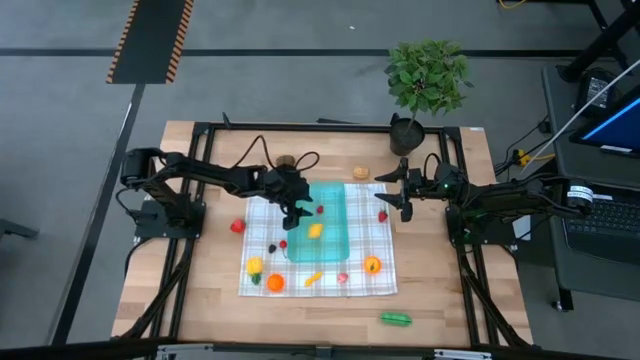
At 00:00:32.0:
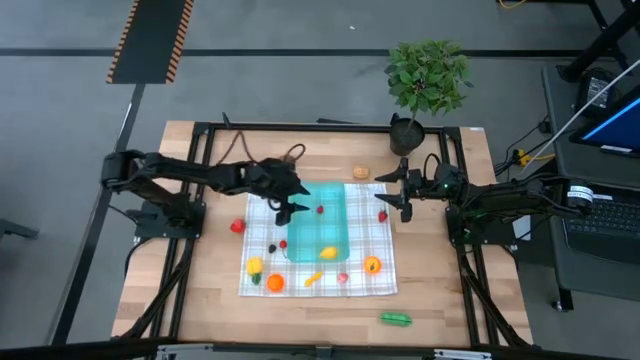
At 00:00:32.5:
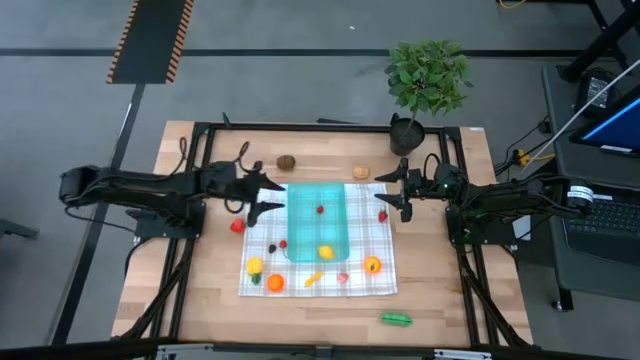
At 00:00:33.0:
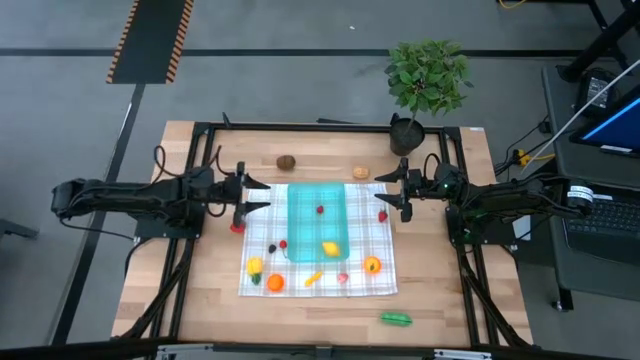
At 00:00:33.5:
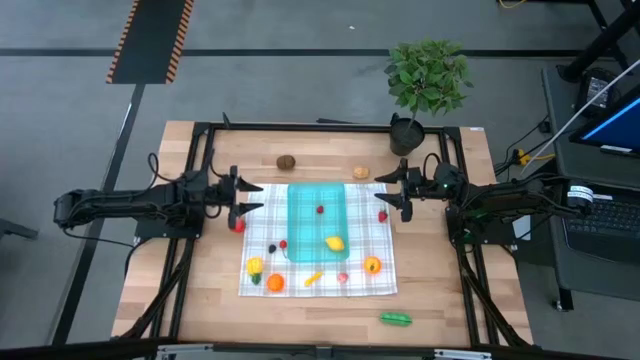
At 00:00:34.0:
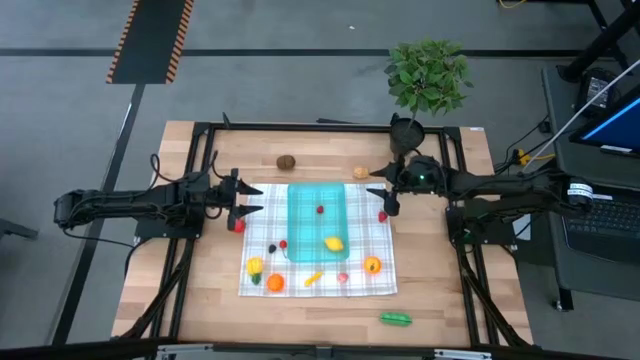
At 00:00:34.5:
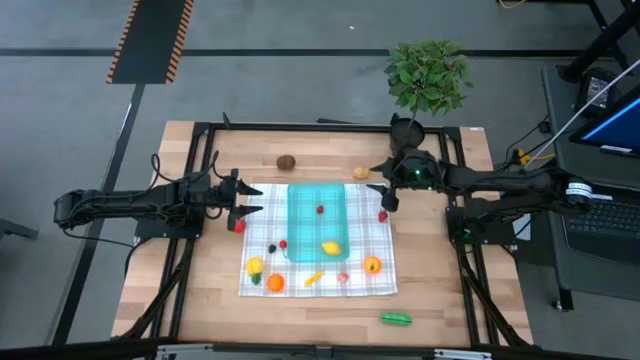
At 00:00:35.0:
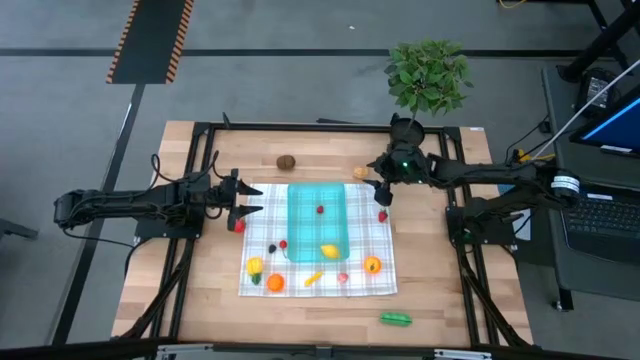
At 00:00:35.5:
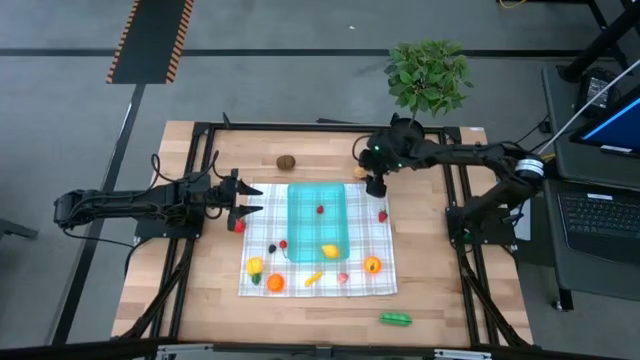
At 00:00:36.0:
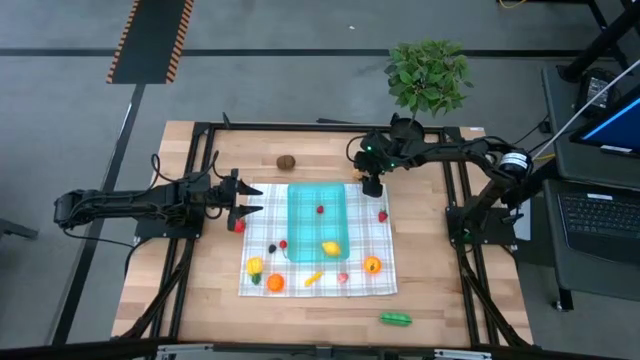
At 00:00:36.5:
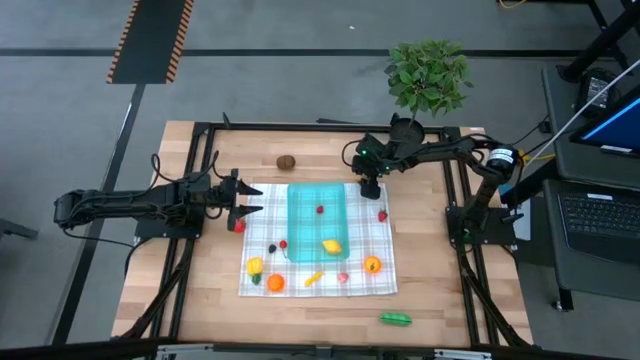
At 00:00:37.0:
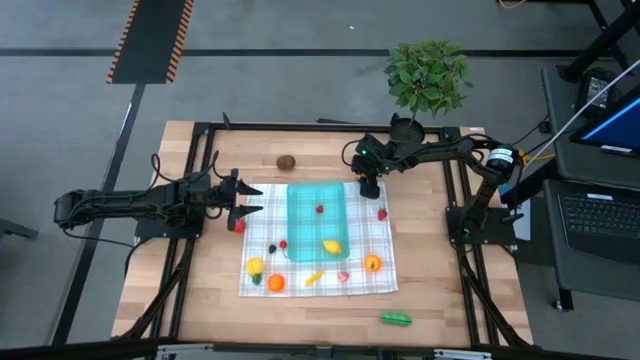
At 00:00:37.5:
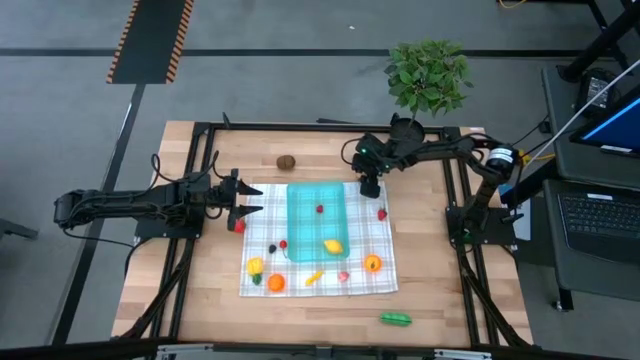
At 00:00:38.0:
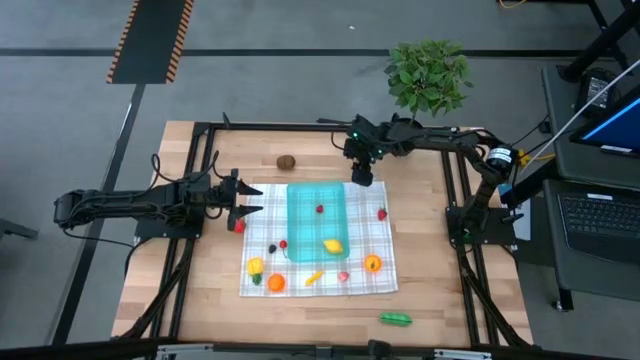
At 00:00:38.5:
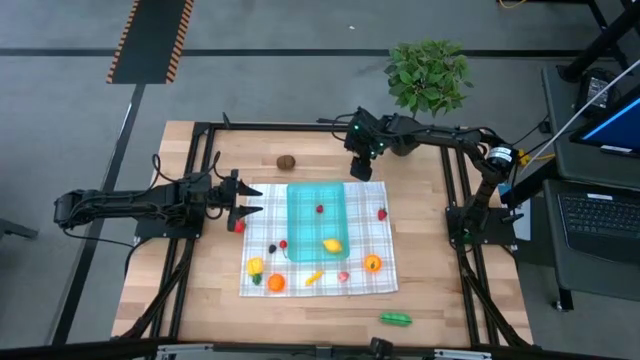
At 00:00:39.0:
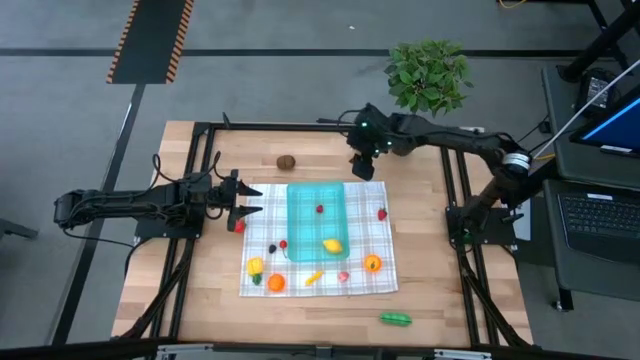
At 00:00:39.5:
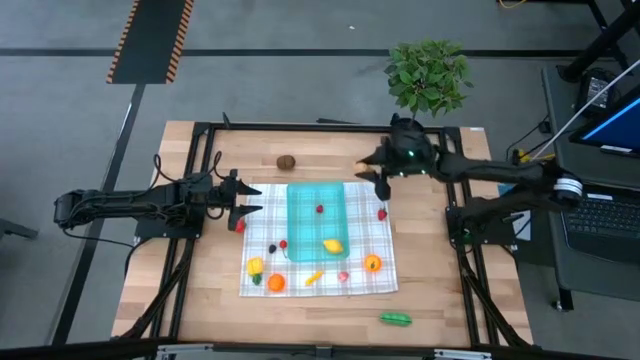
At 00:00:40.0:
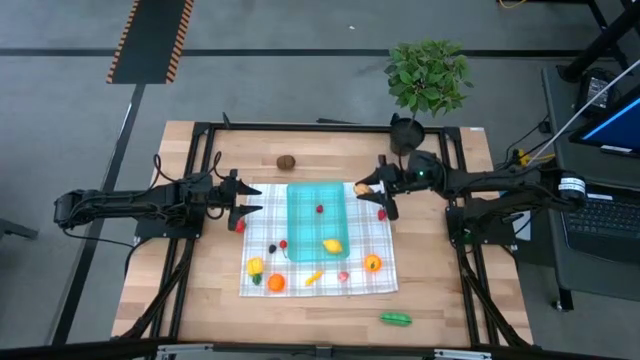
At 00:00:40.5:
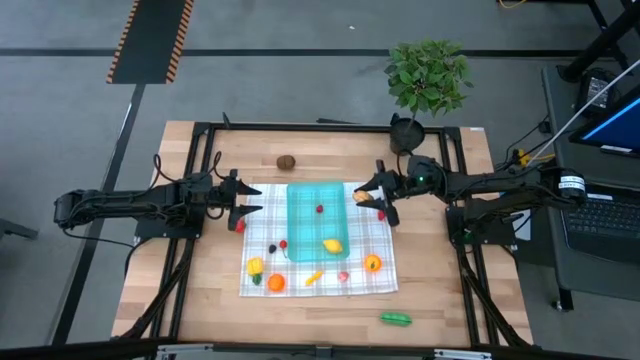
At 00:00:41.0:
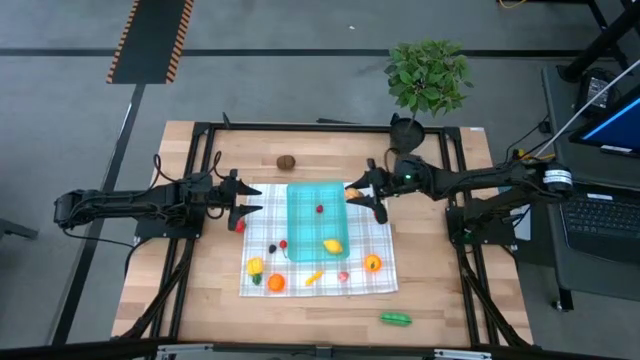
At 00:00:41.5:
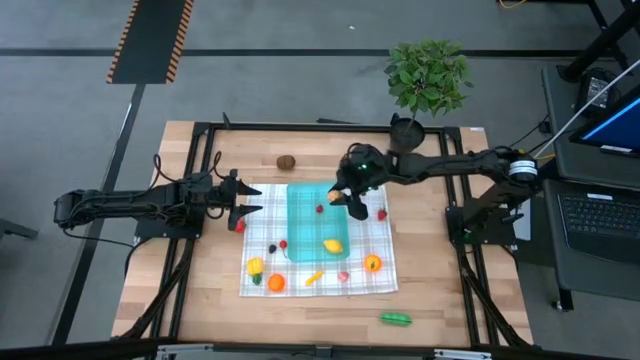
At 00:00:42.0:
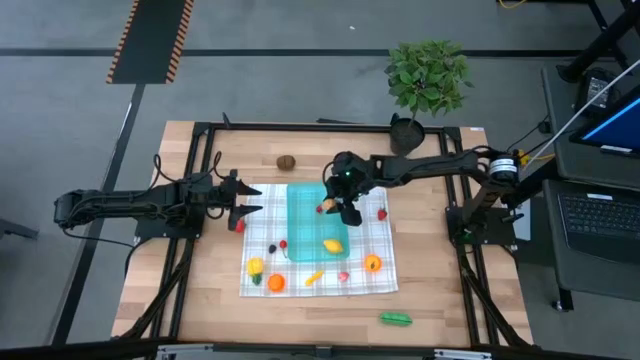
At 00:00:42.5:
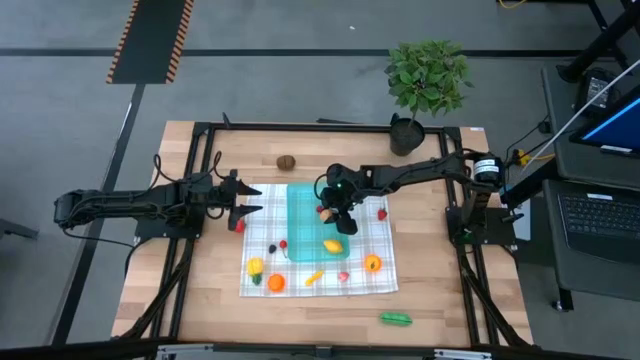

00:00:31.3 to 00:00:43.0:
Task: Pick and placing Produce into tupperware
Put the potato into the blue bin

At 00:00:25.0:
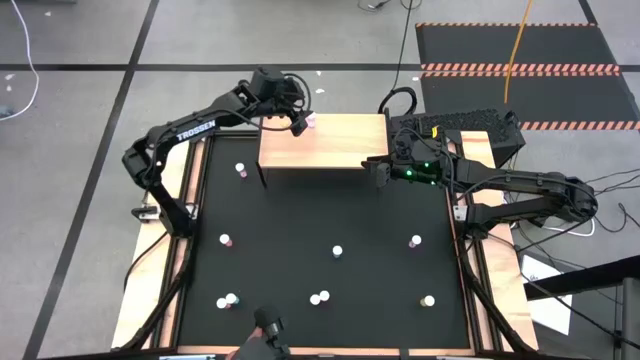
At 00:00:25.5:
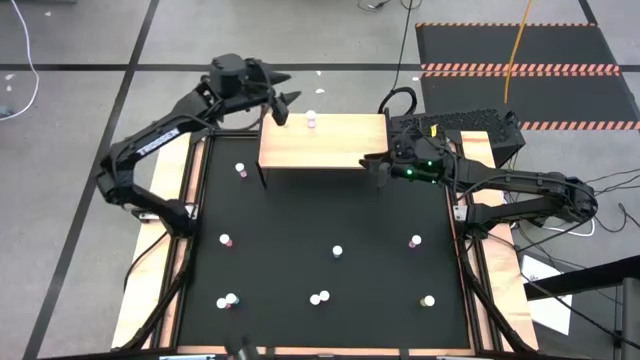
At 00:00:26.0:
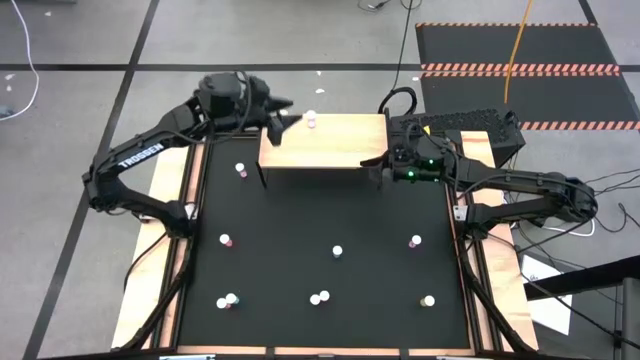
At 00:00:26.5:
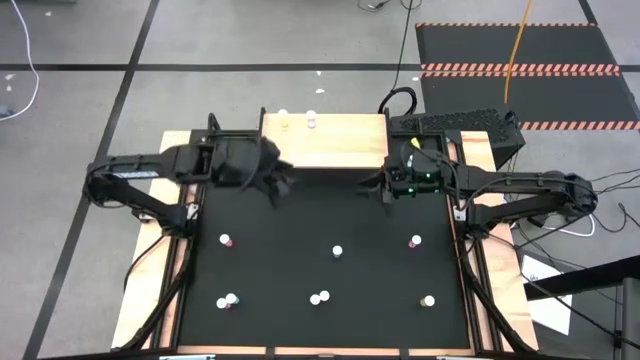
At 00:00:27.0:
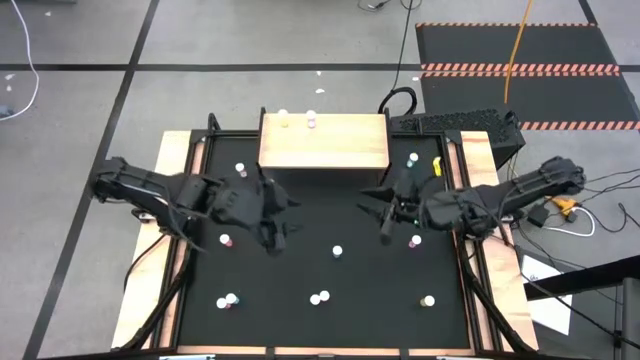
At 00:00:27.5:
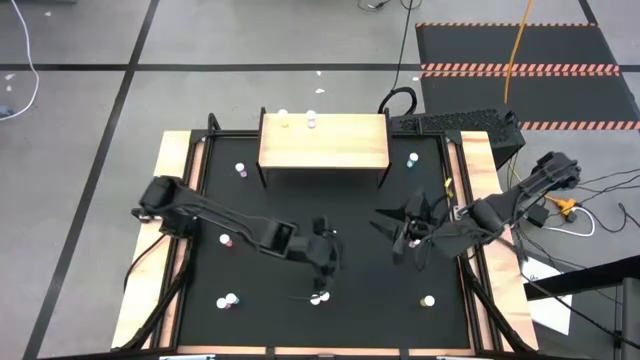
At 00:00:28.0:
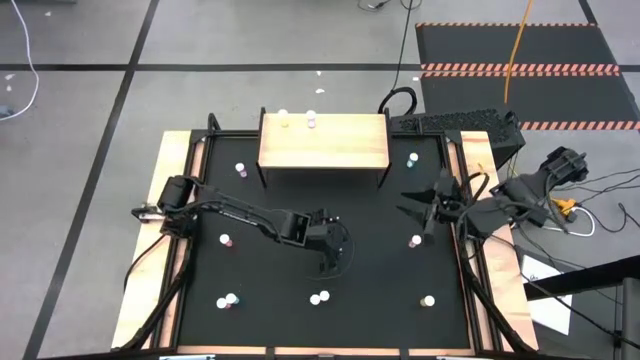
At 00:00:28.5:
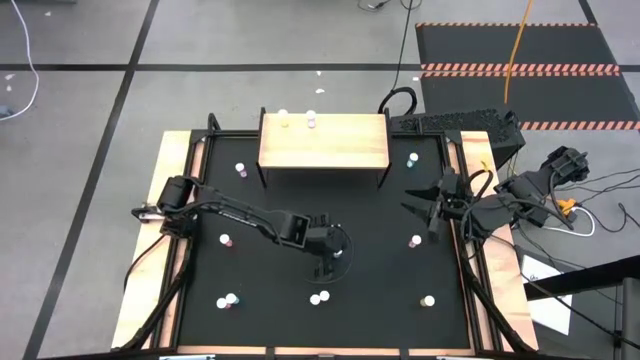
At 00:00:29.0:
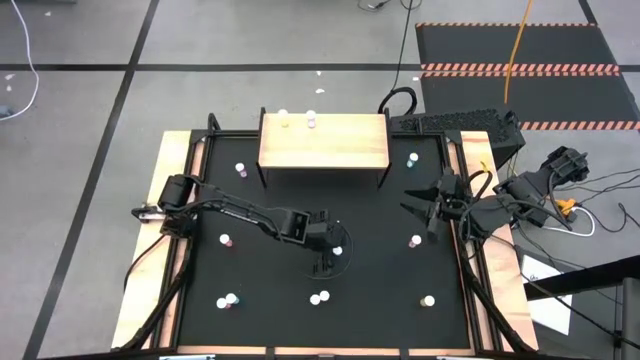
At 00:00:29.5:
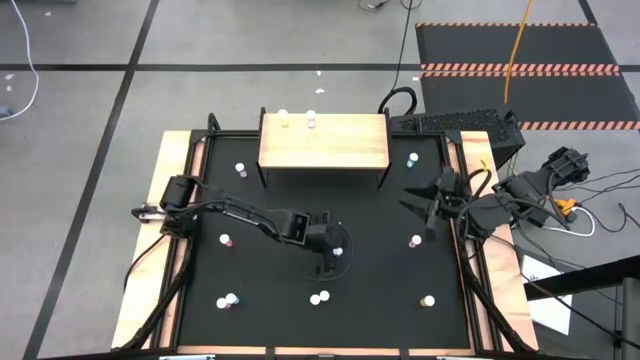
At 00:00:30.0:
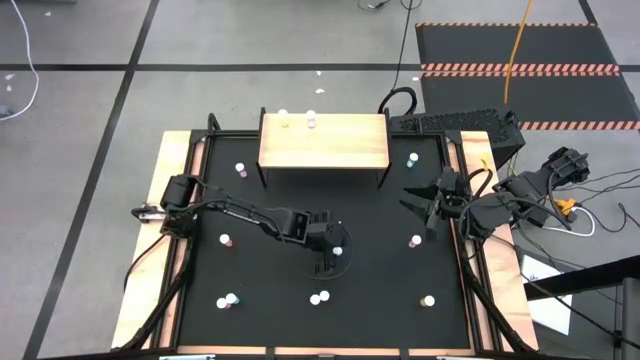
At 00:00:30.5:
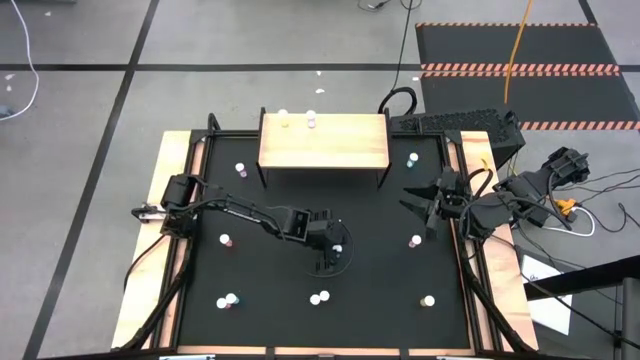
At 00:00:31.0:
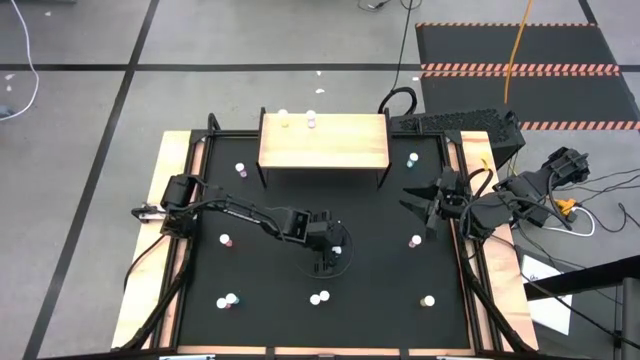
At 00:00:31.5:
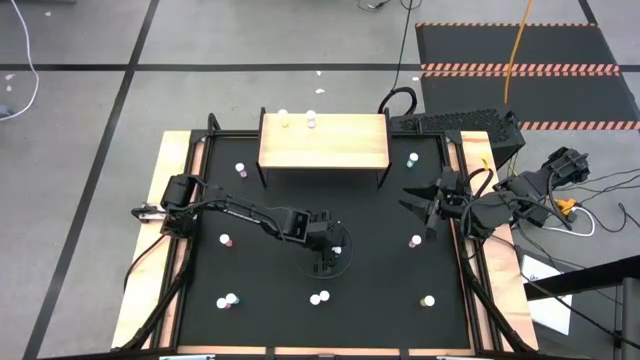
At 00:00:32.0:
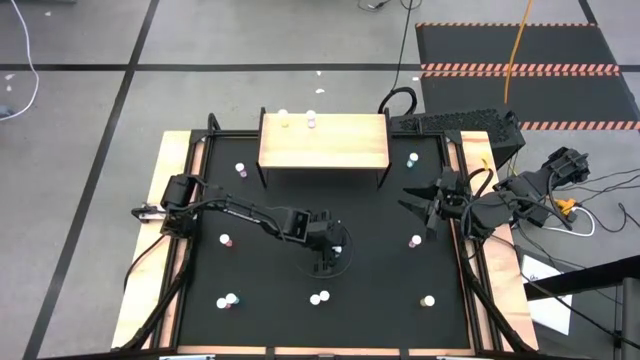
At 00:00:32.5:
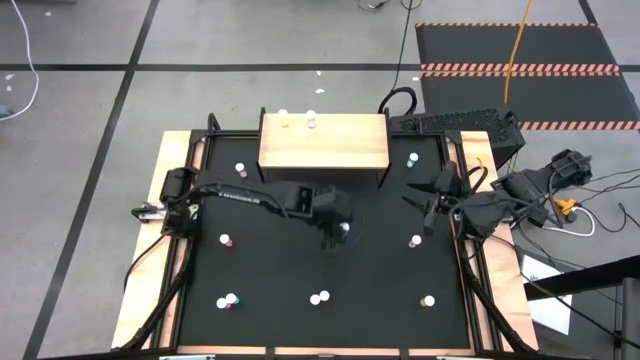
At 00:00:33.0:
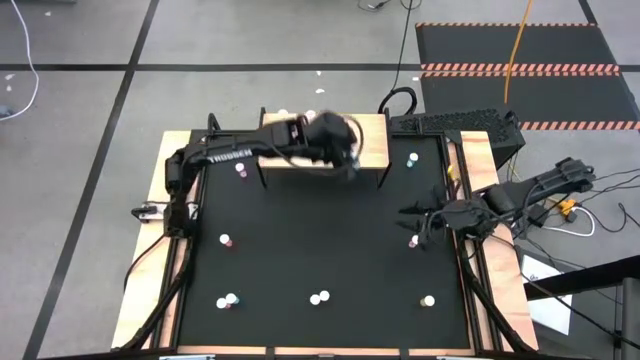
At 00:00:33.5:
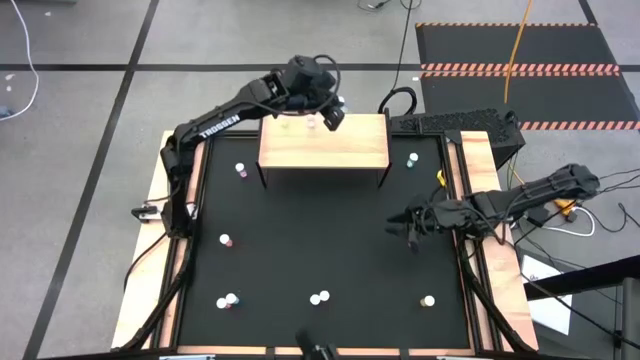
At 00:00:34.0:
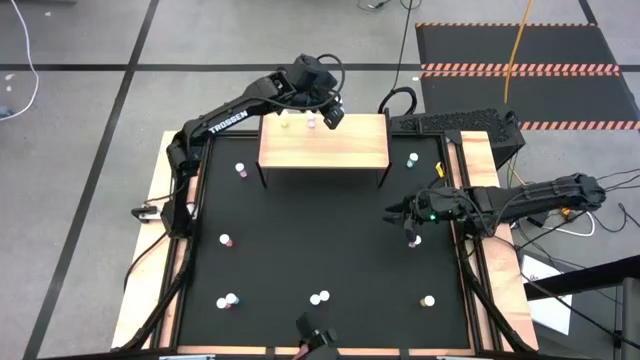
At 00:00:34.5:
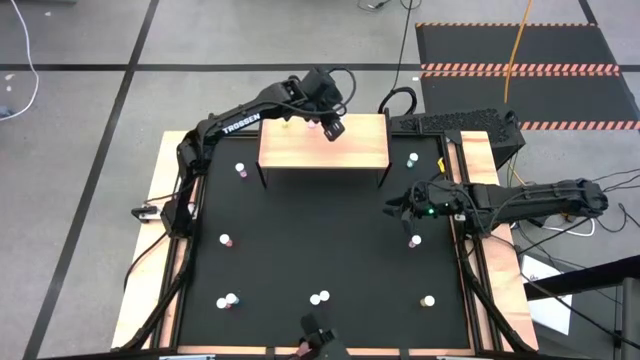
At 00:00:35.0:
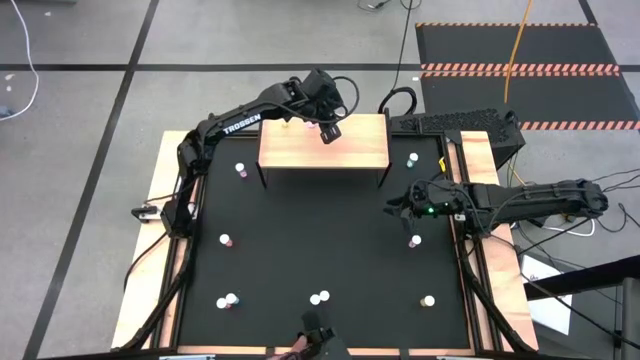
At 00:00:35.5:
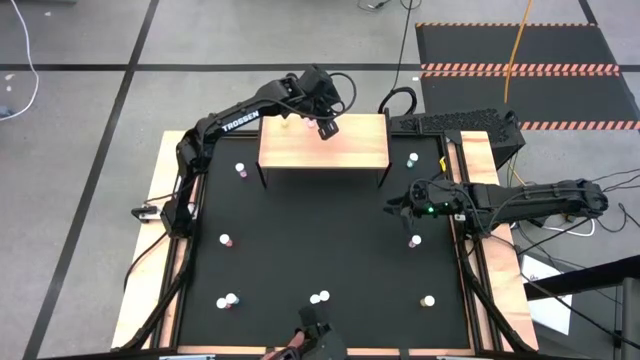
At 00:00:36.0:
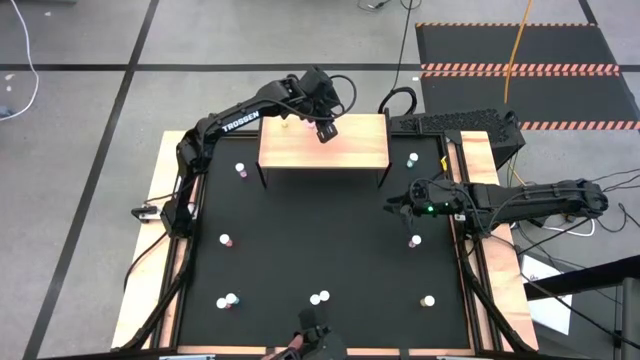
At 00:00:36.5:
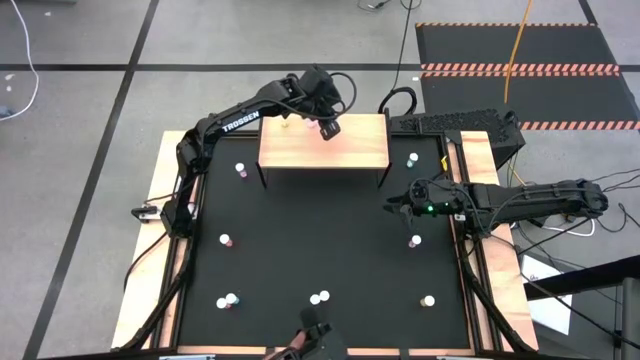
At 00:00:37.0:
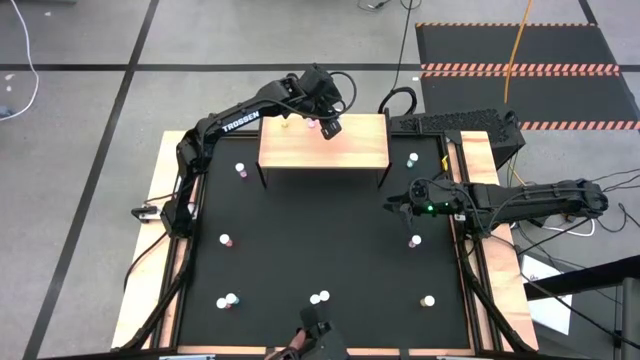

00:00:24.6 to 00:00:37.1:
Task: Pick and place medicine bottles onto shelf by color
Put the middle blue pill bottle on the shelf
